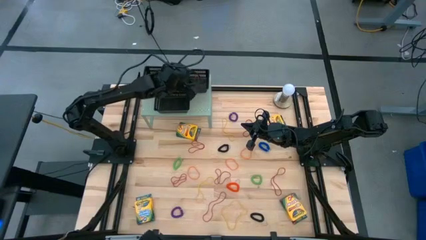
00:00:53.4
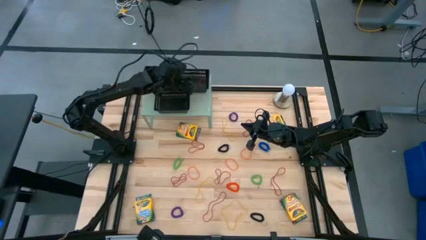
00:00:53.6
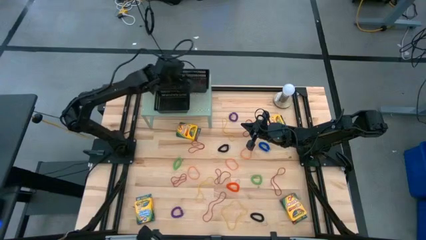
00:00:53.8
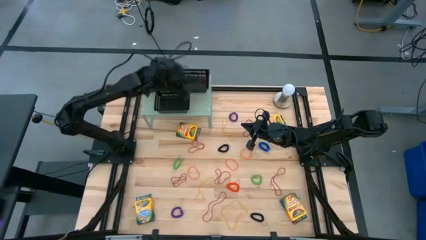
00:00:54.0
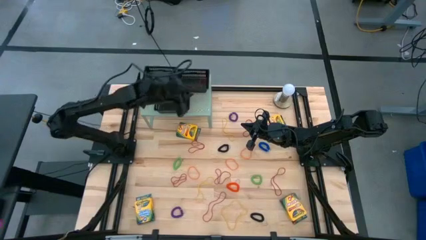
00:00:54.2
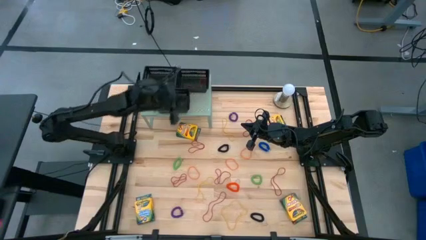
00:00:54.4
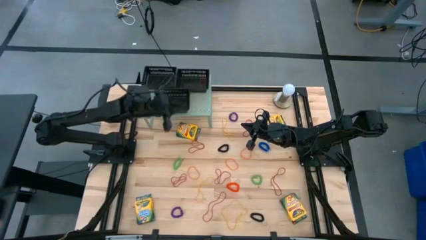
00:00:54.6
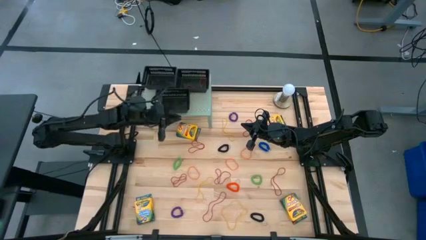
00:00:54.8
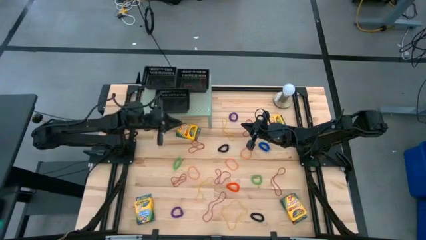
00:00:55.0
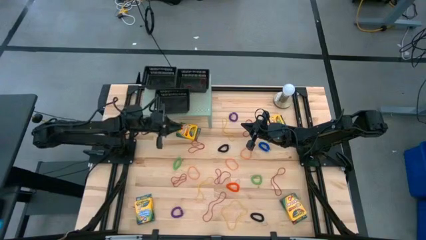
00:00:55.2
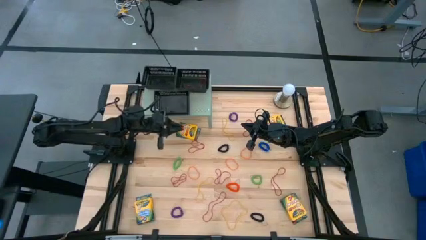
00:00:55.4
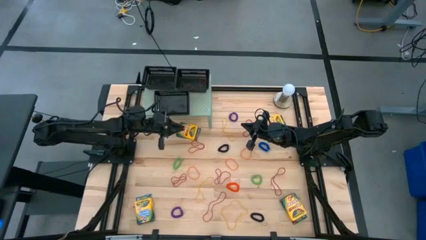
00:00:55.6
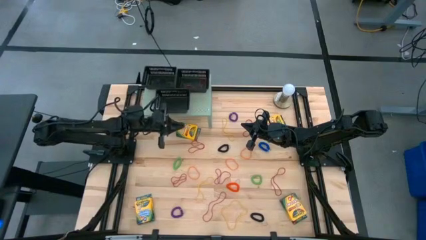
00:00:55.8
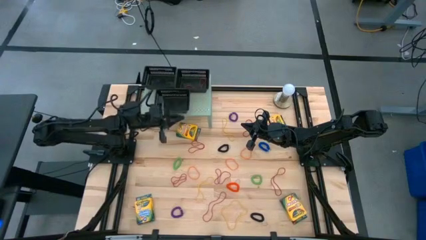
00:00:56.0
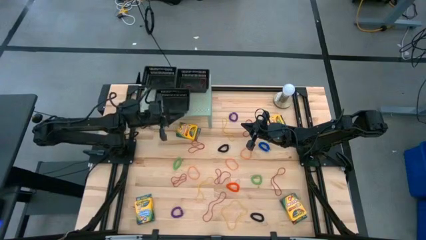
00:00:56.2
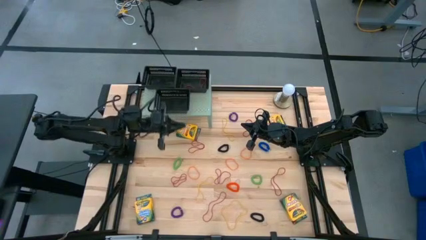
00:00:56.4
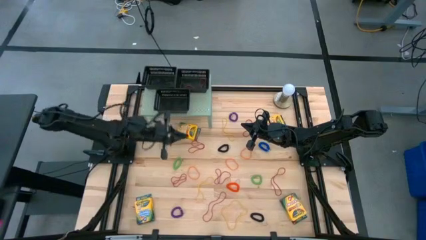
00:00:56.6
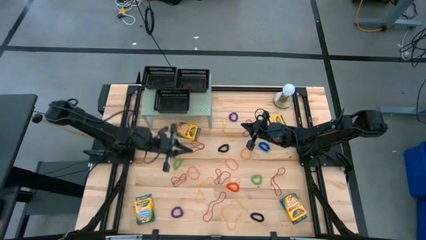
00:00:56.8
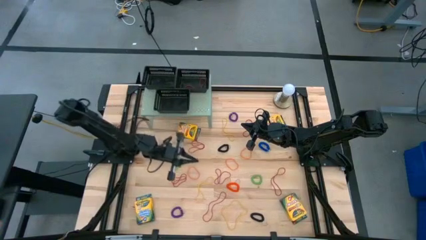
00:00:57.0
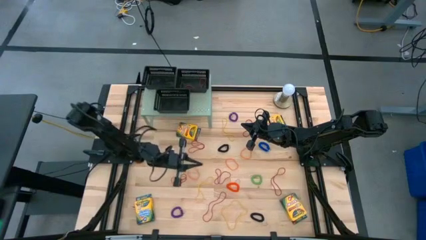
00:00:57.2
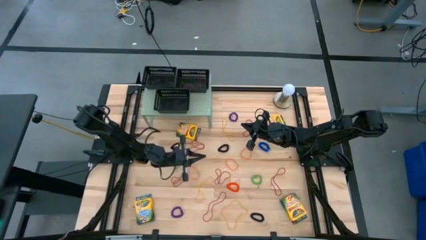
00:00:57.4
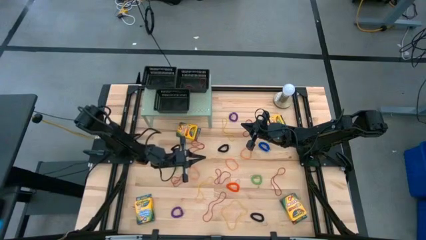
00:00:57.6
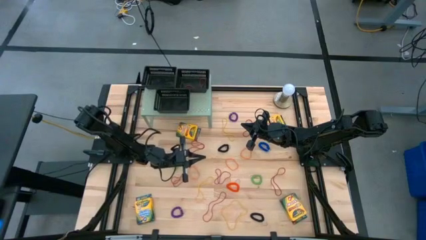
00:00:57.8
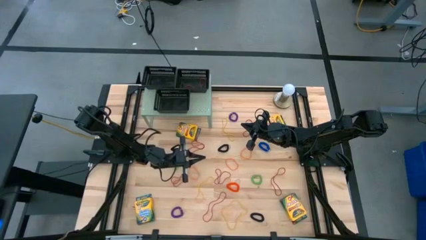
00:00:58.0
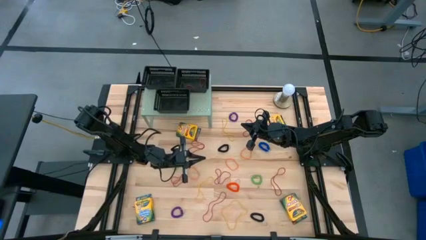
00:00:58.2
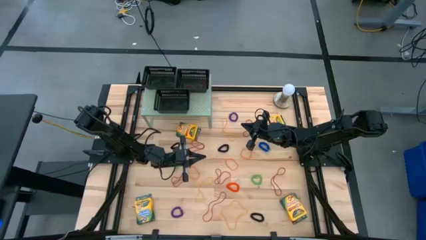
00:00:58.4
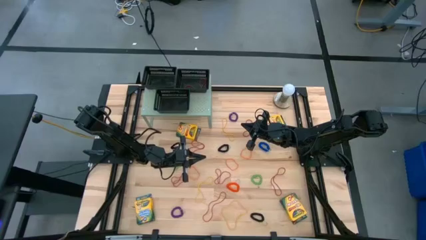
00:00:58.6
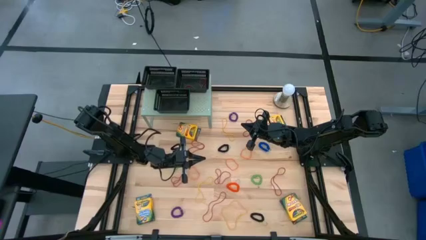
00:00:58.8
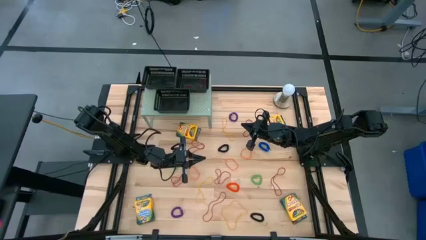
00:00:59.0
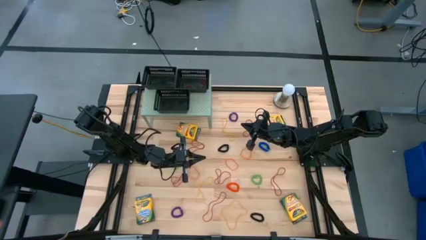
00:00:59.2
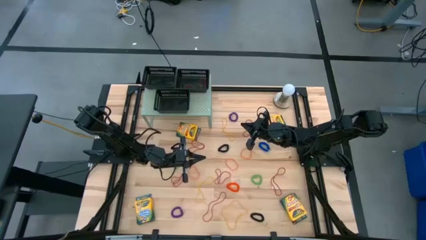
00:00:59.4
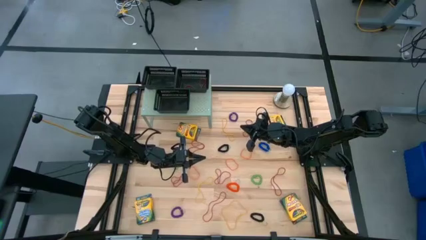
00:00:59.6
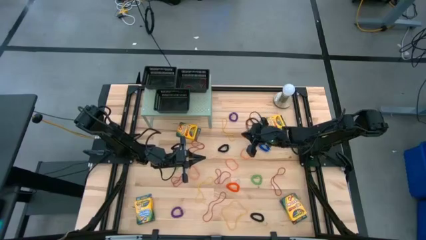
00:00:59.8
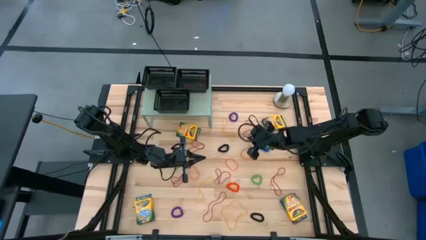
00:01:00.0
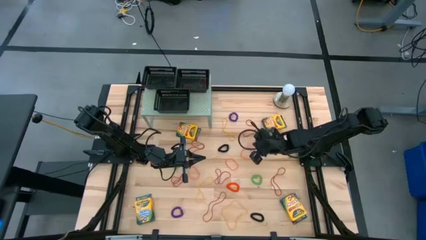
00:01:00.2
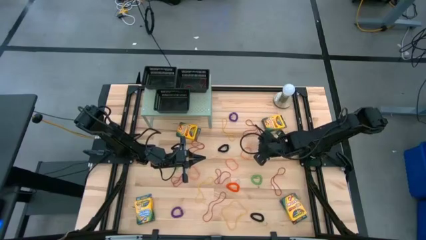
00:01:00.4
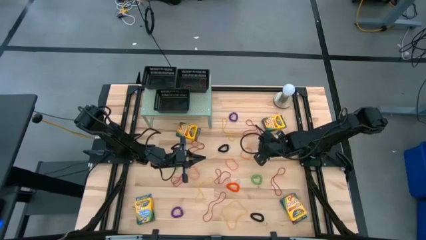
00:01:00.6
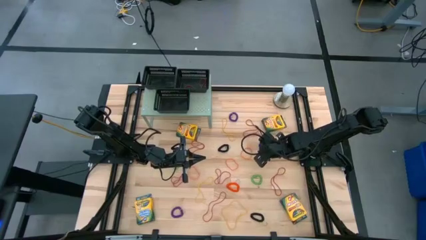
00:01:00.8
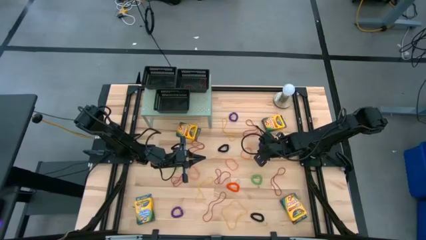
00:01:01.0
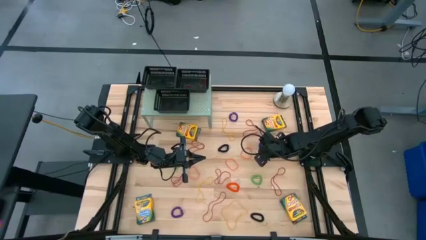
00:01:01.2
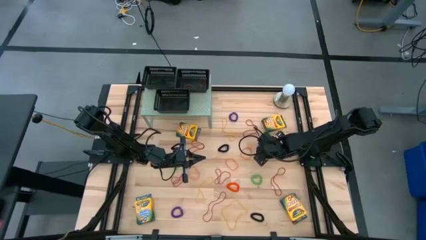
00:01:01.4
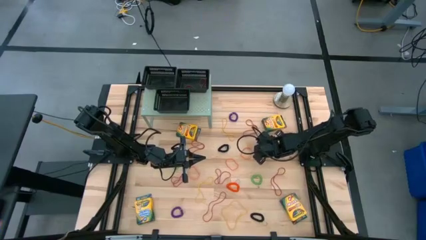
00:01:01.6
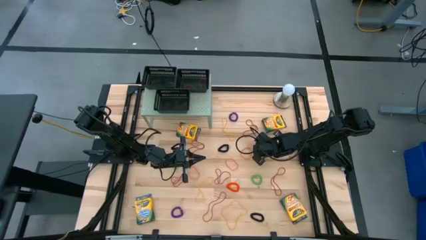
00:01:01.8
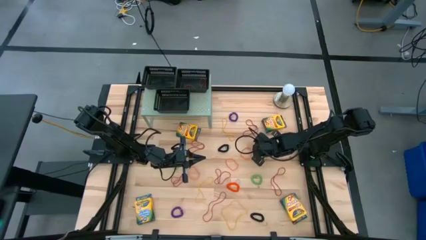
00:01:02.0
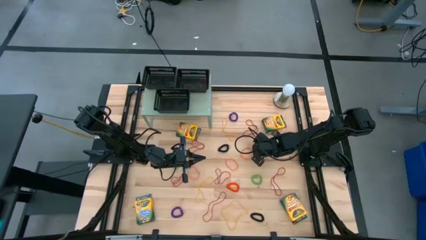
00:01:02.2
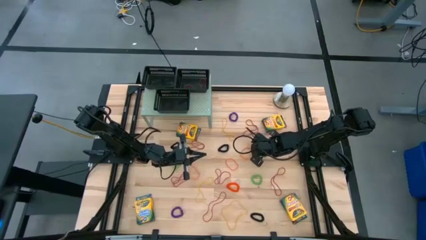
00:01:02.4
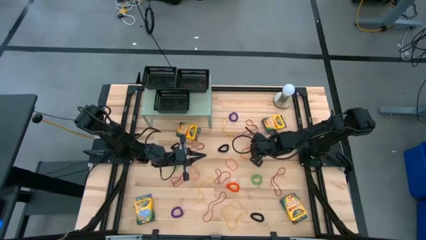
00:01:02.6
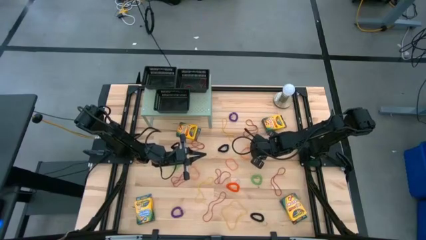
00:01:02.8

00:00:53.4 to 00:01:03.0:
Task: Pick & Place Office Desk Supplies
Put the blue spring rubberband into the top left black bin

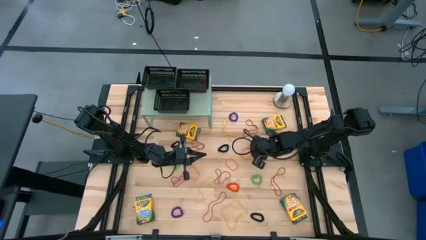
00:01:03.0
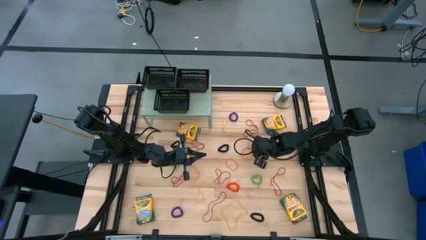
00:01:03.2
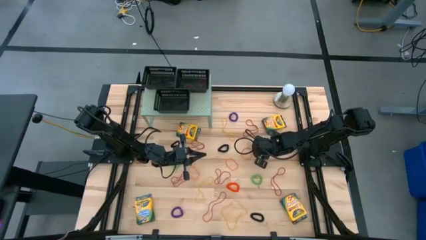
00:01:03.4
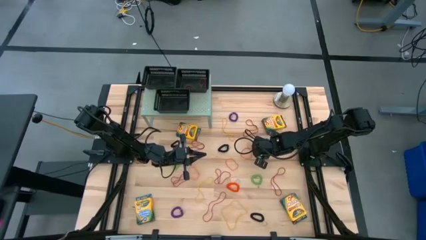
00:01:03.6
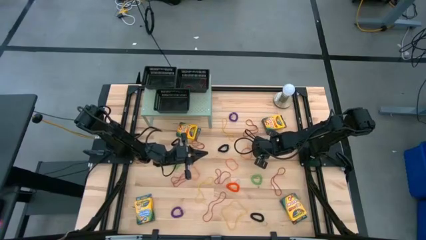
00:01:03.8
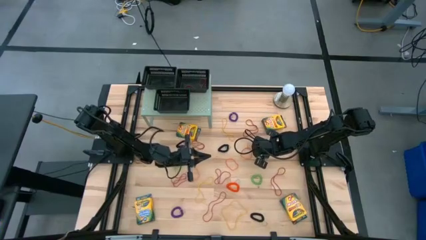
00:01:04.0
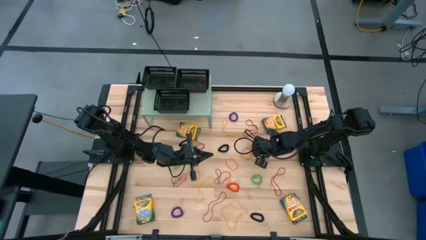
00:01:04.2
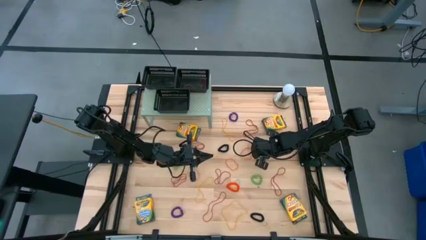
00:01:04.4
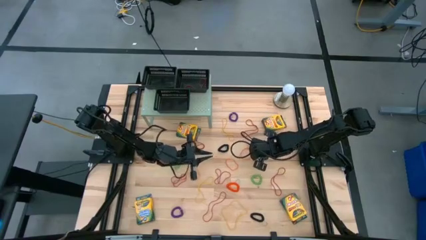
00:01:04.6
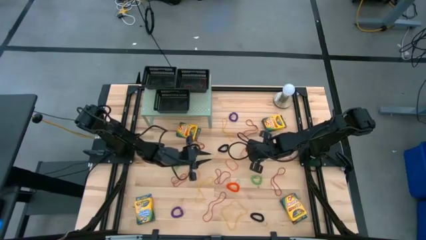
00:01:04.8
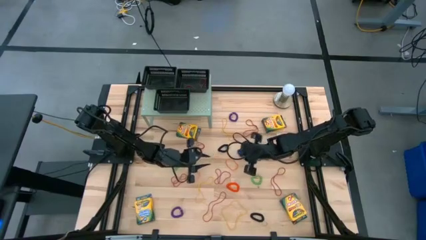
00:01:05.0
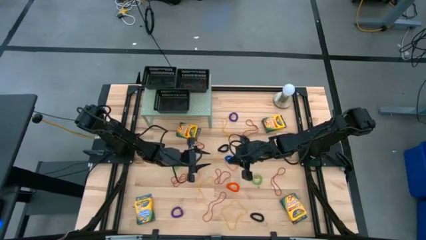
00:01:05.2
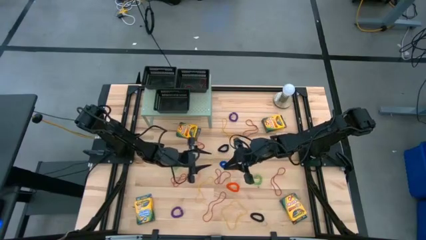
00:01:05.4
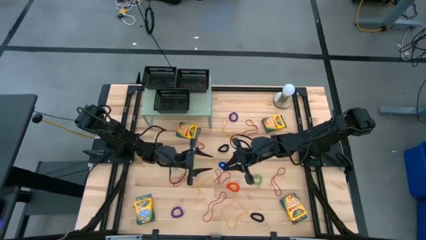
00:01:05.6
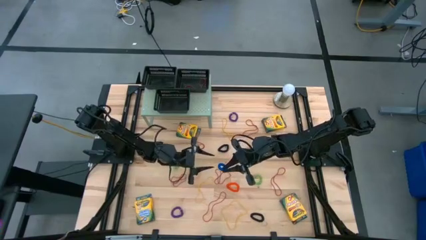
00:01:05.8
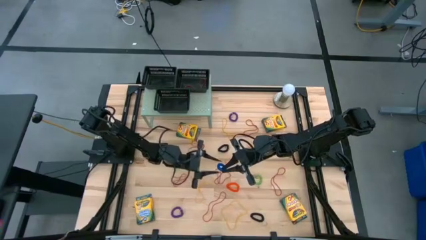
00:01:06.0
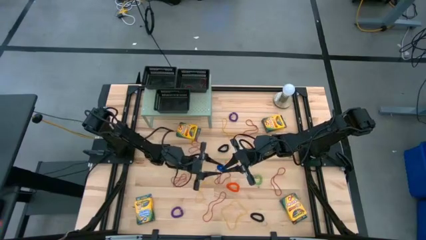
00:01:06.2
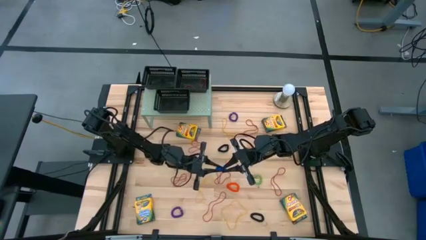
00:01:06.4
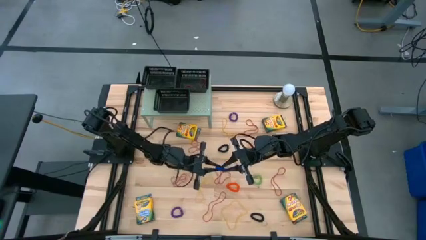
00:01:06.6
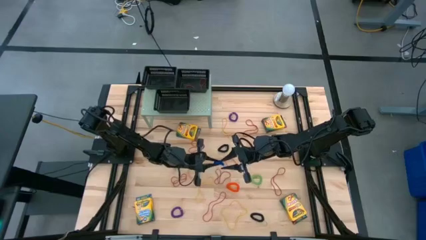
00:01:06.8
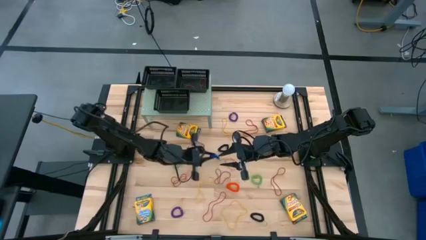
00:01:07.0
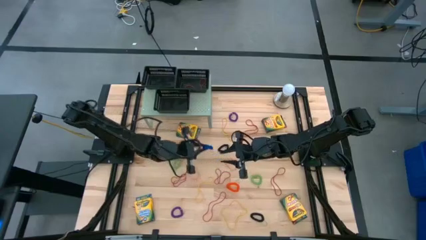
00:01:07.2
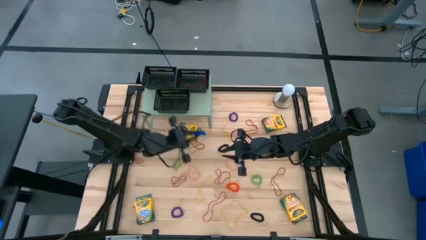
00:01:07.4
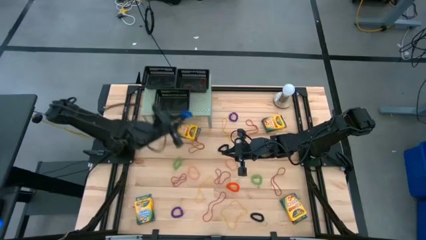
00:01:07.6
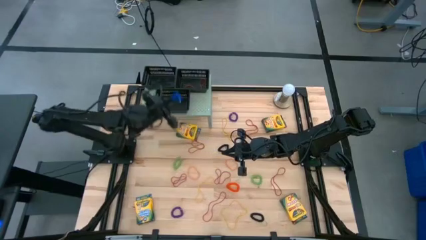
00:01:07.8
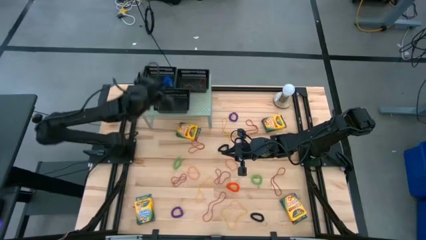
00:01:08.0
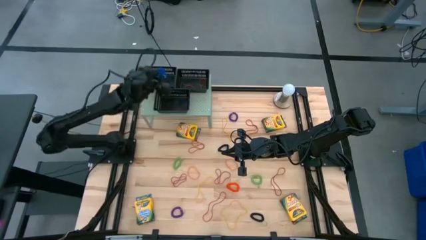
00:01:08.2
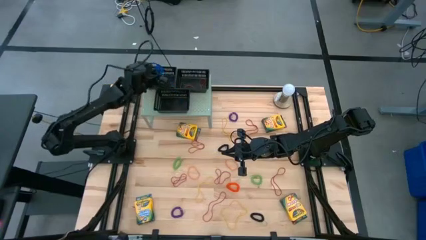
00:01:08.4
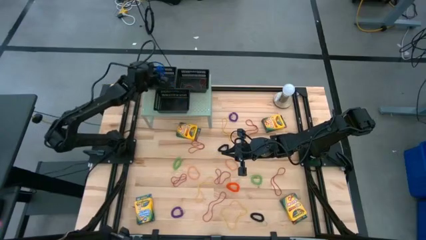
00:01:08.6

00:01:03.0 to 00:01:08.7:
Put the blue spring rubberband into the top left black bin

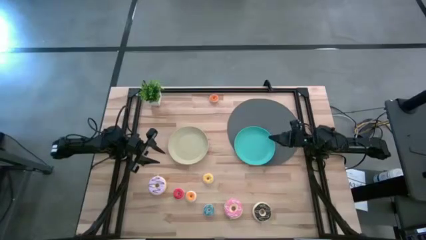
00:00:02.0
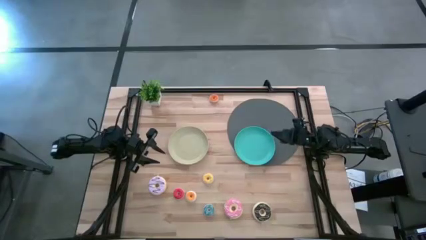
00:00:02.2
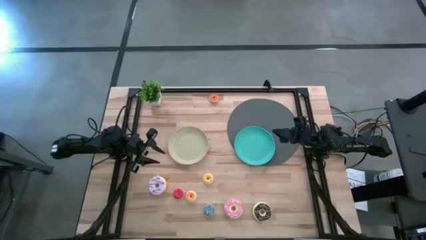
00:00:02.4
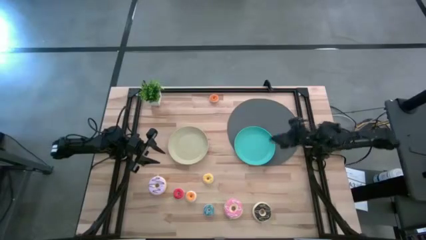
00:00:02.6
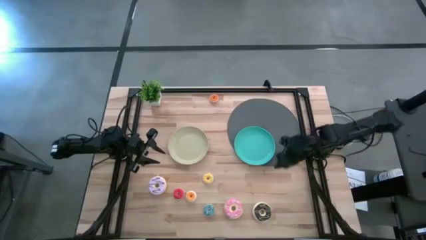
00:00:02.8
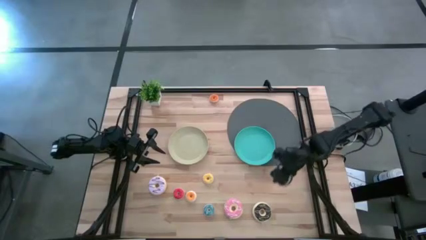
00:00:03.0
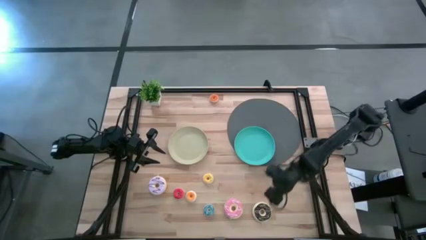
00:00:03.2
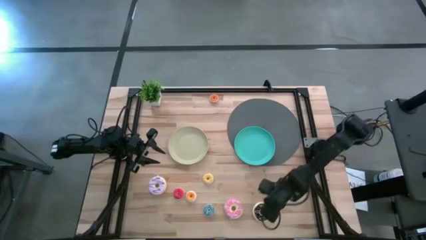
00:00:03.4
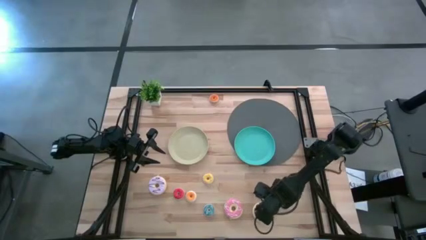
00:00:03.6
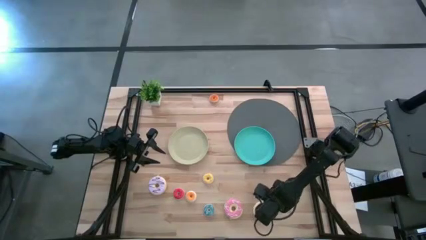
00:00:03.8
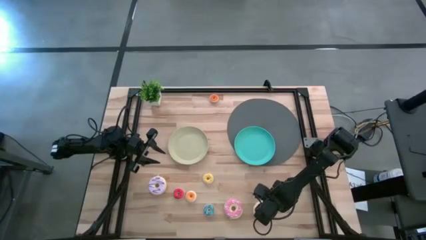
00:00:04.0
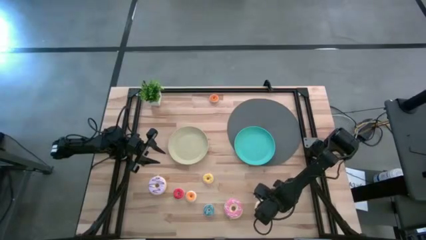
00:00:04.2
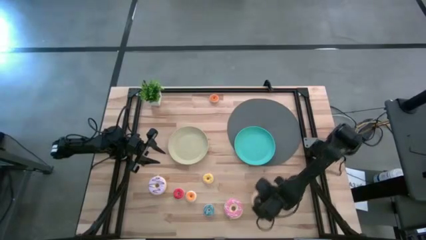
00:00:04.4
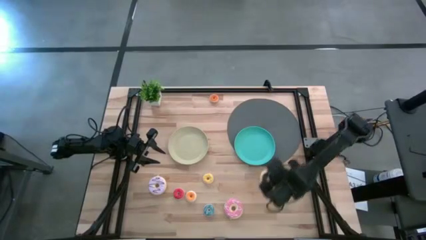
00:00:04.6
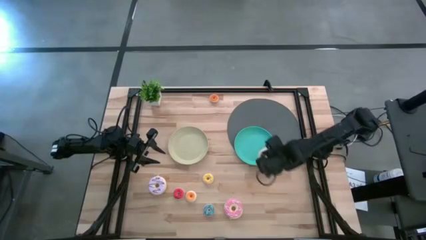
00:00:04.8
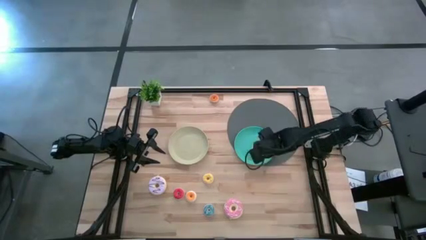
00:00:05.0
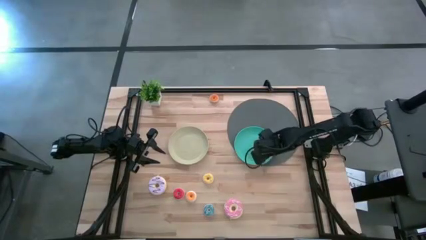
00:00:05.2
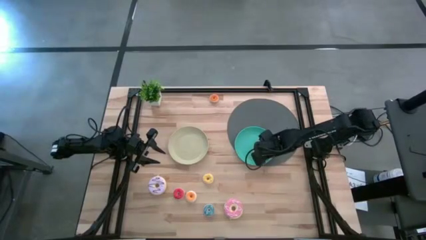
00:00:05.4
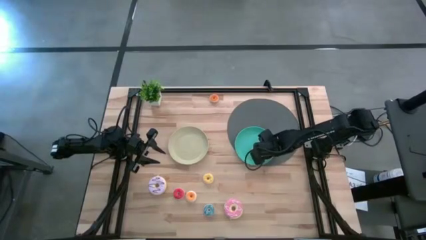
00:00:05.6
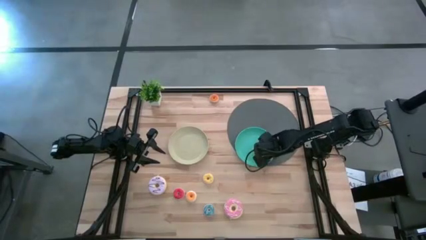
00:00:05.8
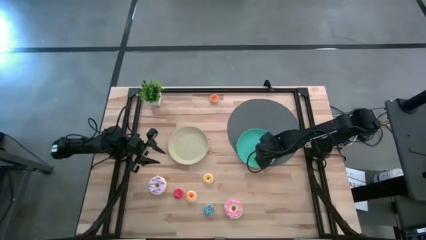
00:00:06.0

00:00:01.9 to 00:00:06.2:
Task: Pick & Place donuts
Put the large black donut on the blue plate
